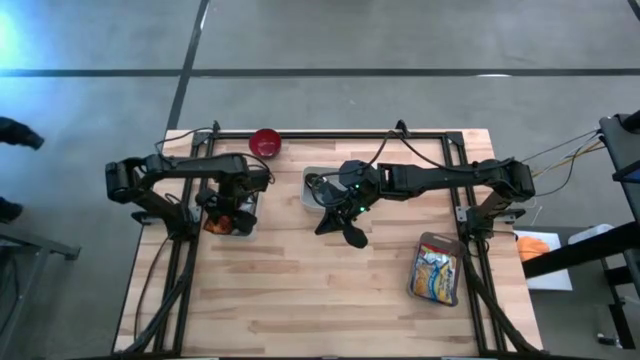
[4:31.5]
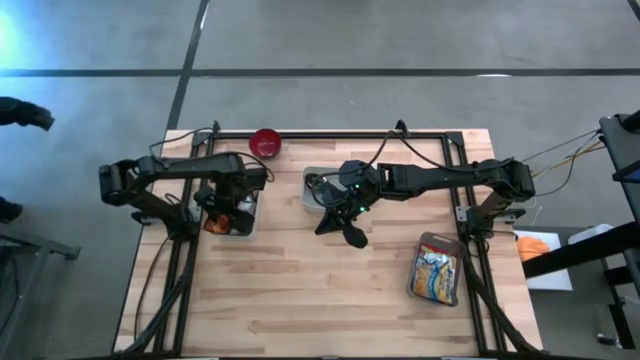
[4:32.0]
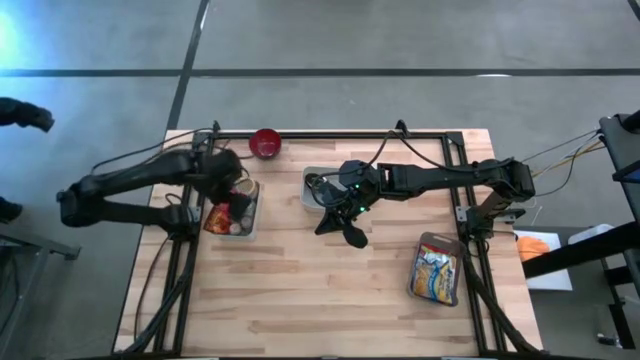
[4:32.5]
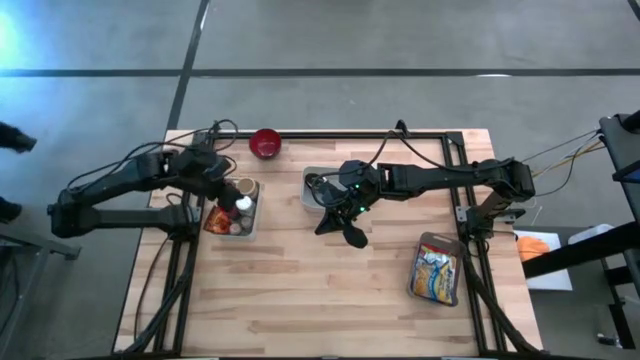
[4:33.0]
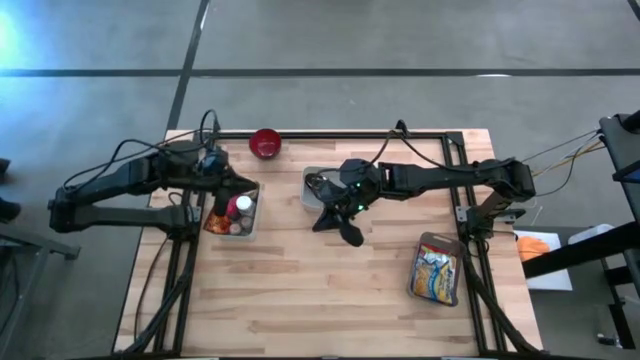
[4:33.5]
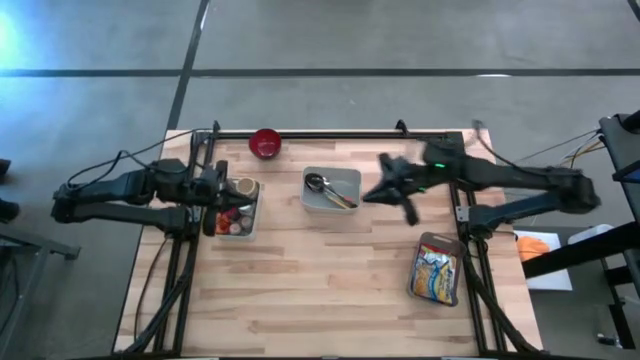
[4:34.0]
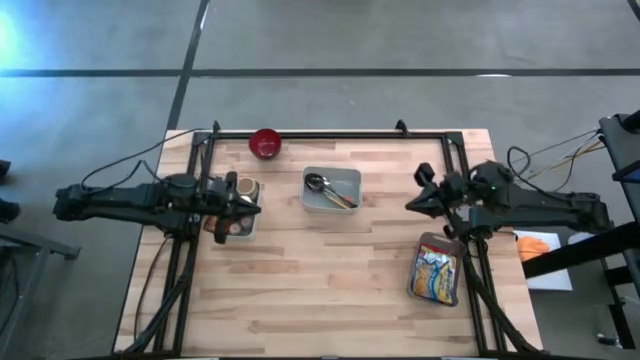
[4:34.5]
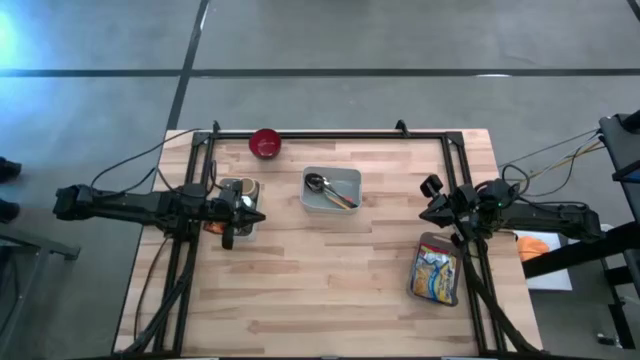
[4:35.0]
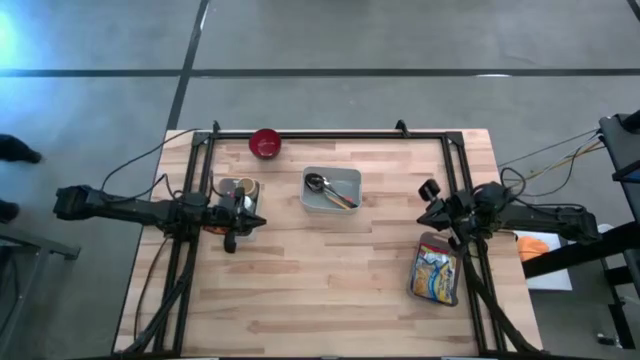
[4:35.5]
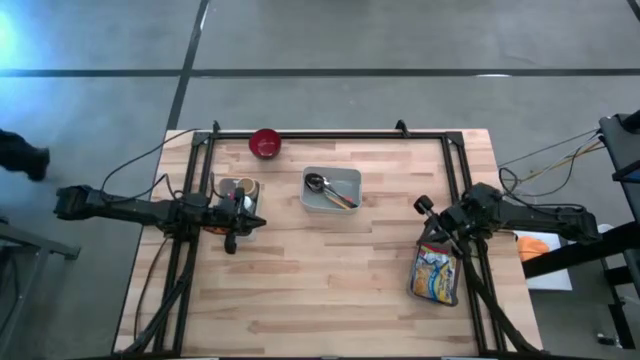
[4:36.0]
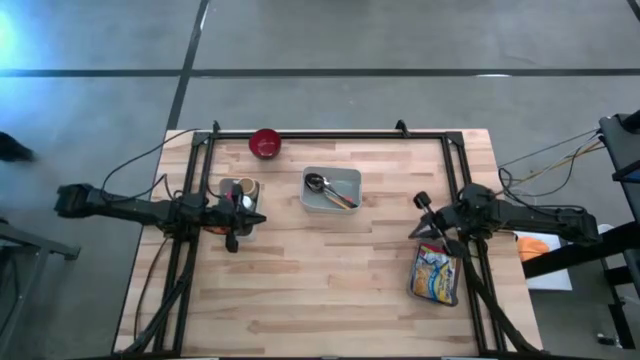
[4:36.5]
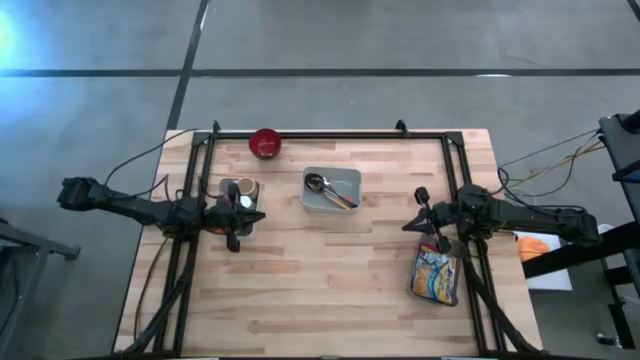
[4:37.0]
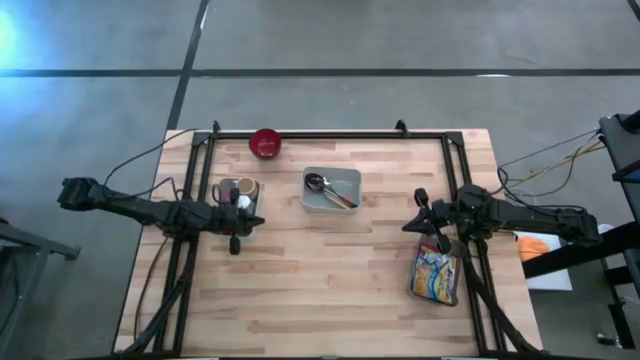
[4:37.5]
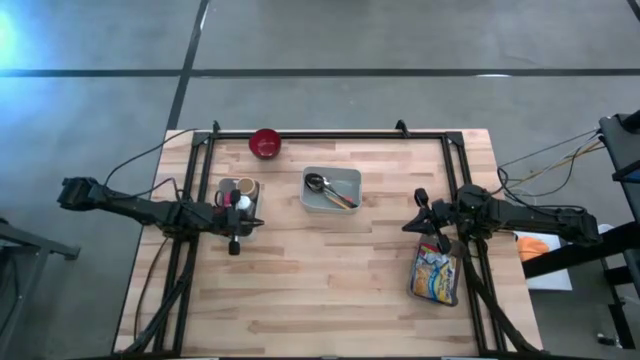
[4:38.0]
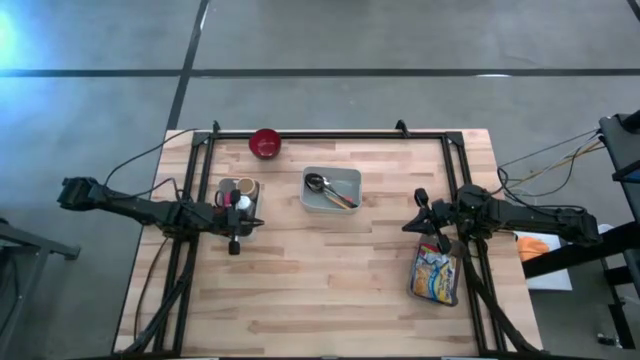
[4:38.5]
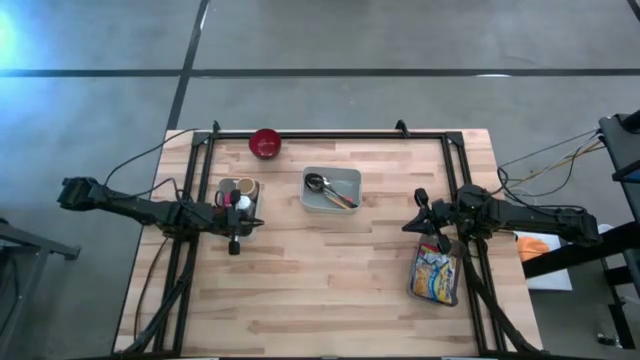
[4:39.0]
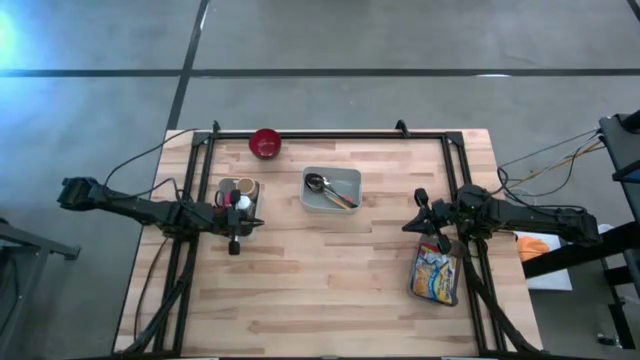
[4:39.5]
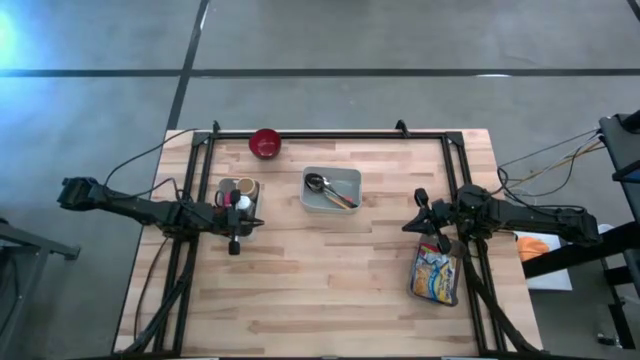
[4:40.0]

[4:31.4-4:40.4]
Return to Home Position
